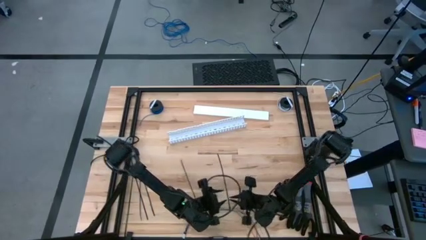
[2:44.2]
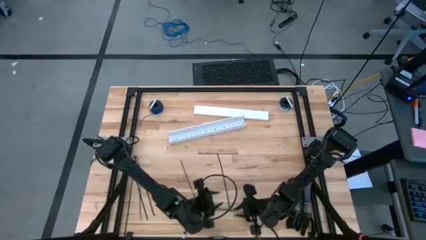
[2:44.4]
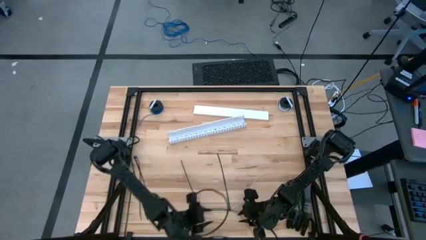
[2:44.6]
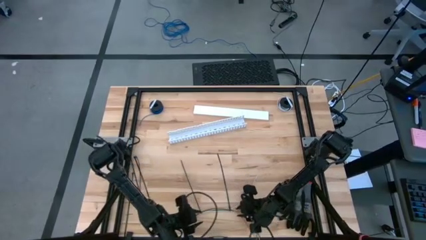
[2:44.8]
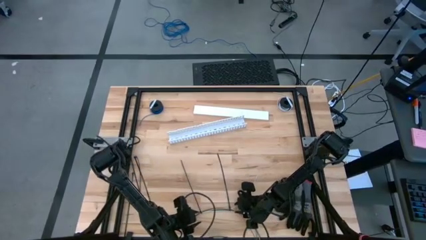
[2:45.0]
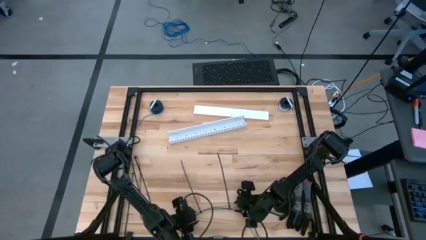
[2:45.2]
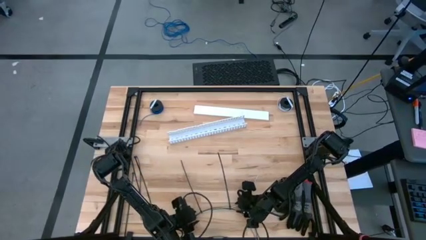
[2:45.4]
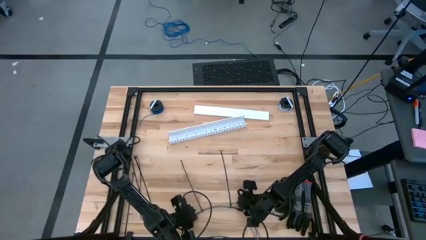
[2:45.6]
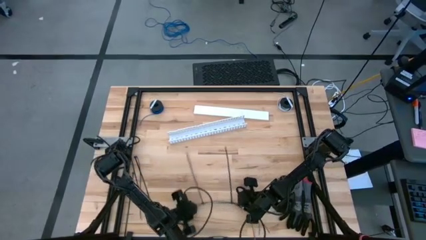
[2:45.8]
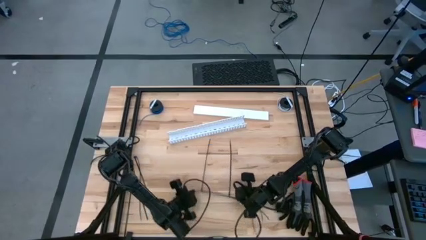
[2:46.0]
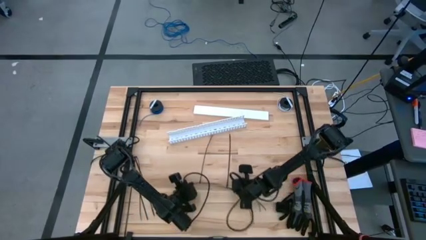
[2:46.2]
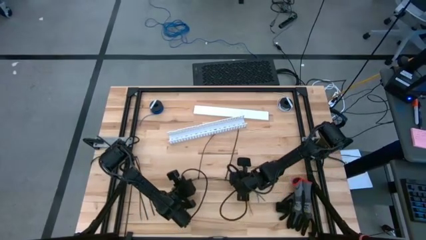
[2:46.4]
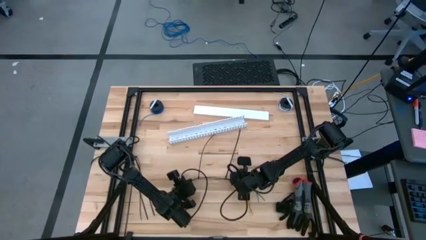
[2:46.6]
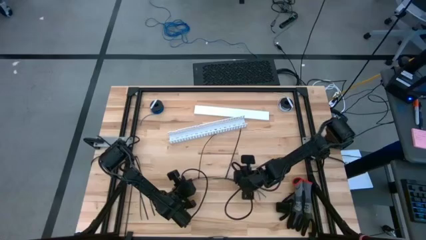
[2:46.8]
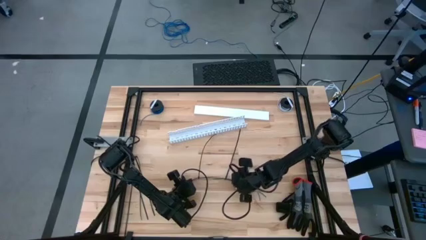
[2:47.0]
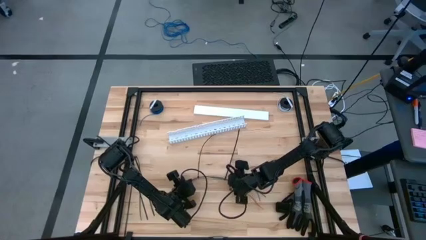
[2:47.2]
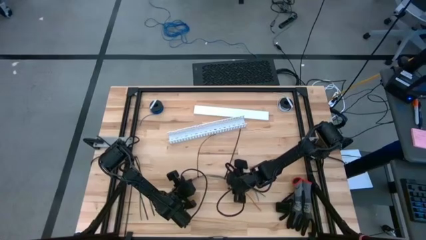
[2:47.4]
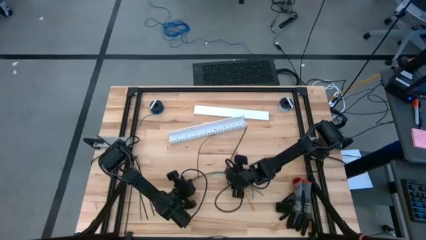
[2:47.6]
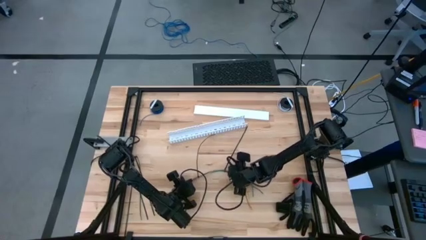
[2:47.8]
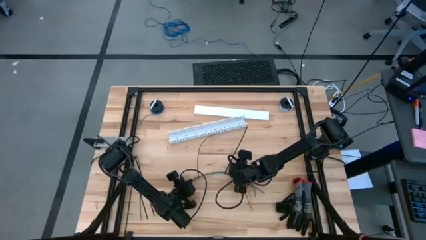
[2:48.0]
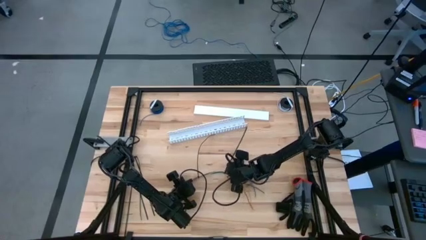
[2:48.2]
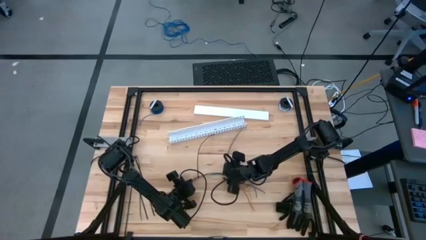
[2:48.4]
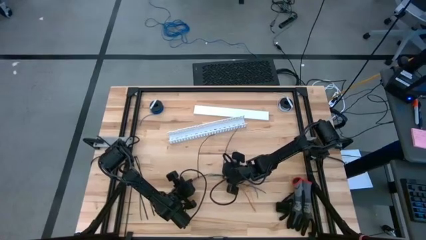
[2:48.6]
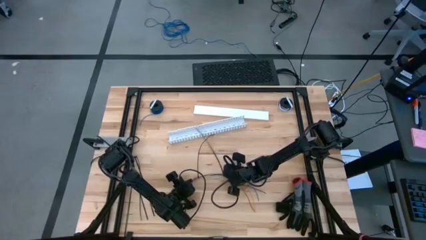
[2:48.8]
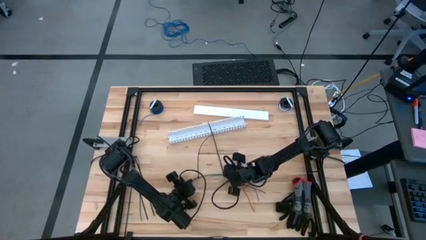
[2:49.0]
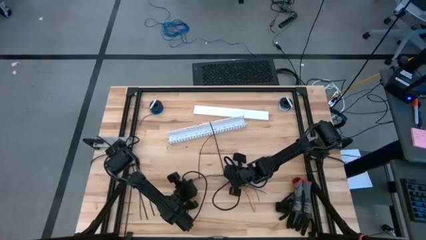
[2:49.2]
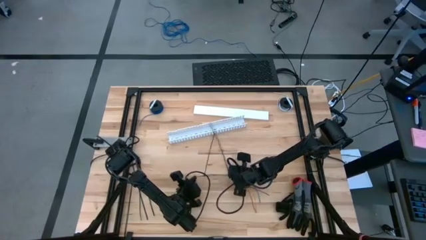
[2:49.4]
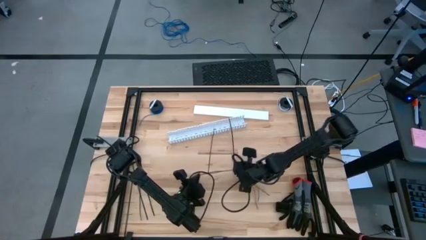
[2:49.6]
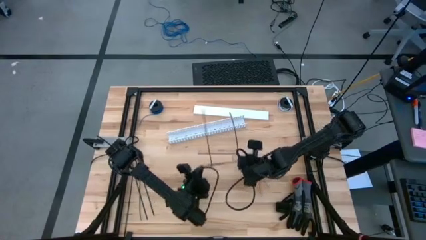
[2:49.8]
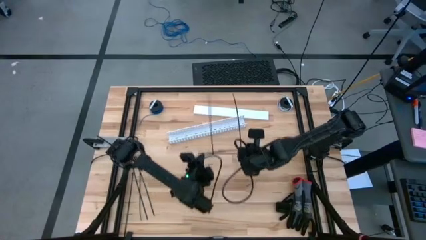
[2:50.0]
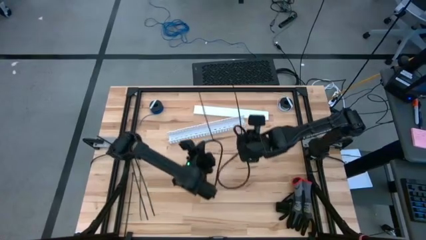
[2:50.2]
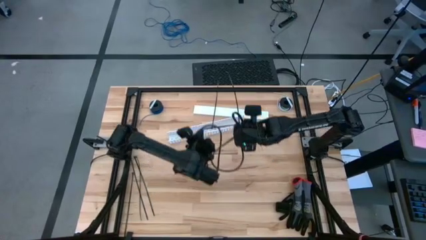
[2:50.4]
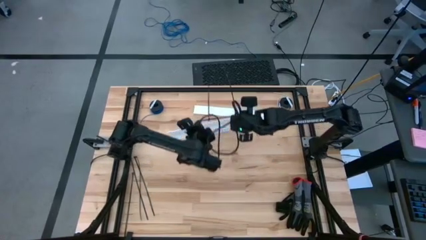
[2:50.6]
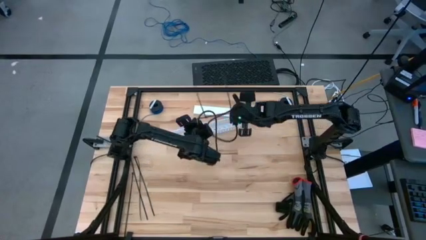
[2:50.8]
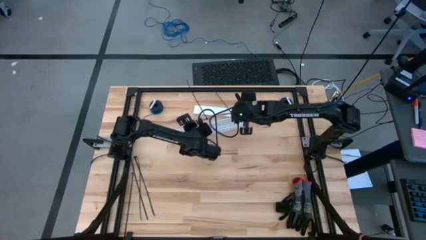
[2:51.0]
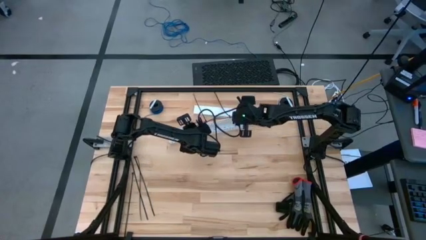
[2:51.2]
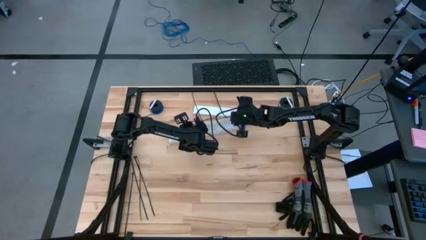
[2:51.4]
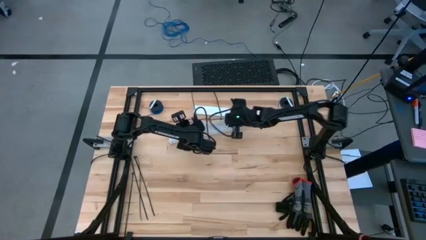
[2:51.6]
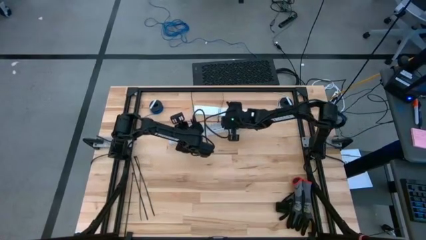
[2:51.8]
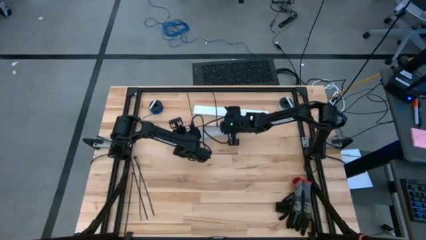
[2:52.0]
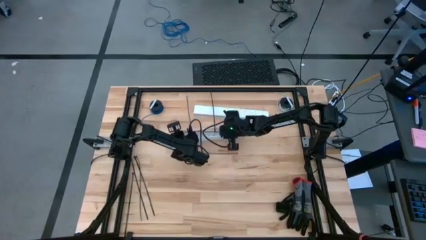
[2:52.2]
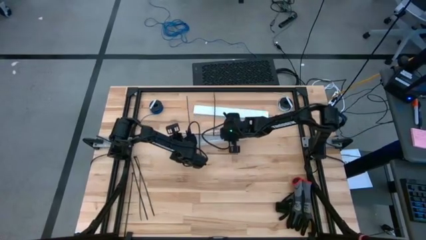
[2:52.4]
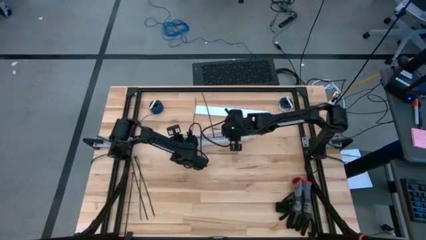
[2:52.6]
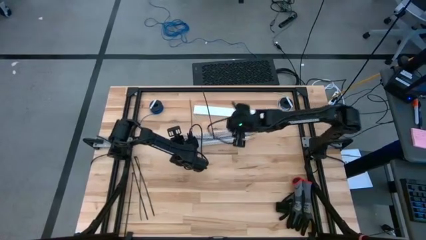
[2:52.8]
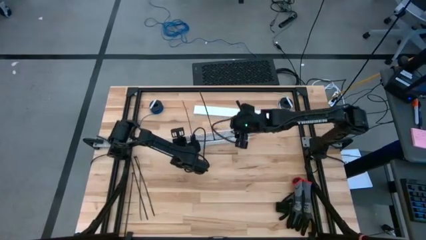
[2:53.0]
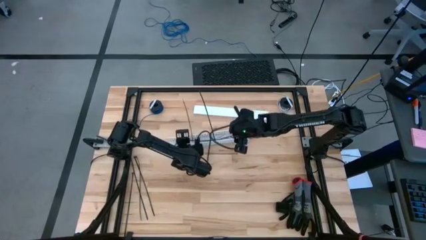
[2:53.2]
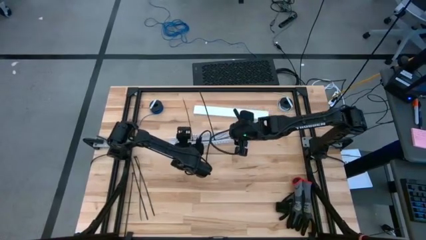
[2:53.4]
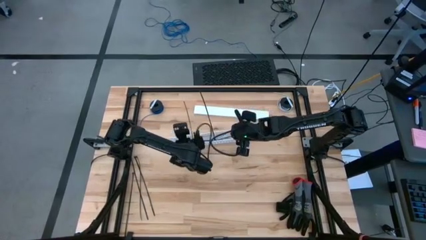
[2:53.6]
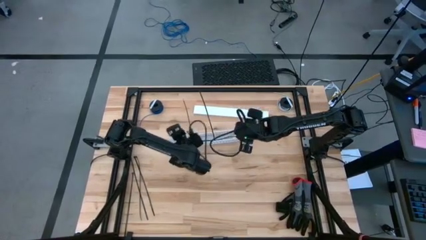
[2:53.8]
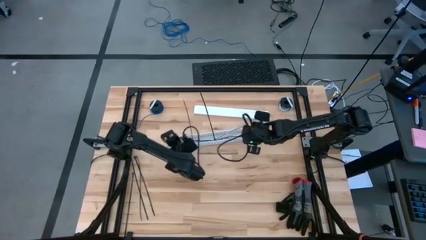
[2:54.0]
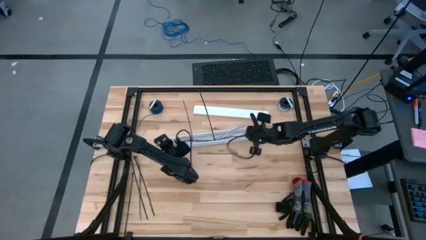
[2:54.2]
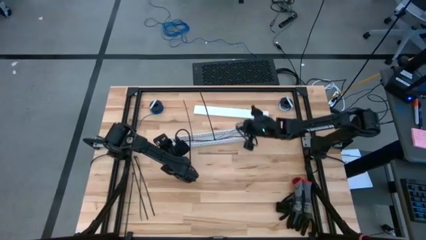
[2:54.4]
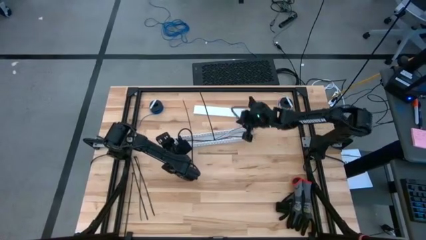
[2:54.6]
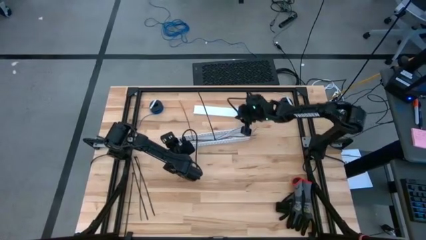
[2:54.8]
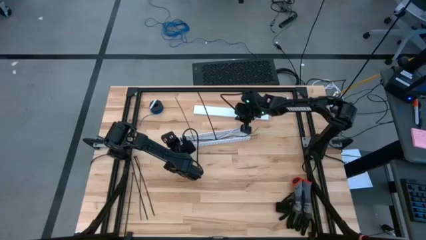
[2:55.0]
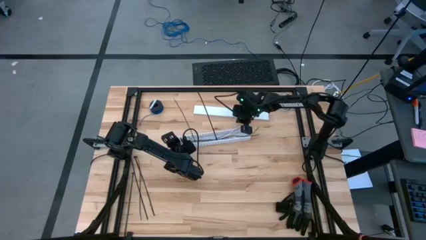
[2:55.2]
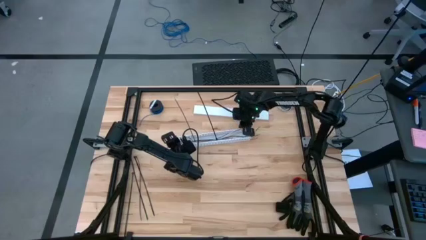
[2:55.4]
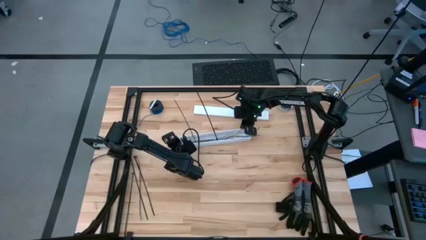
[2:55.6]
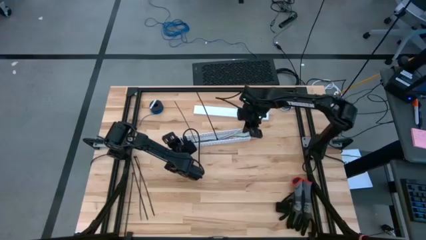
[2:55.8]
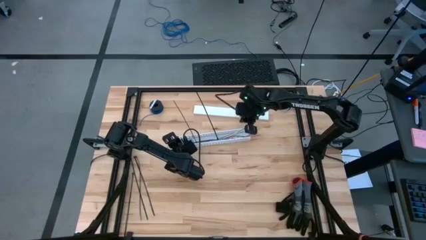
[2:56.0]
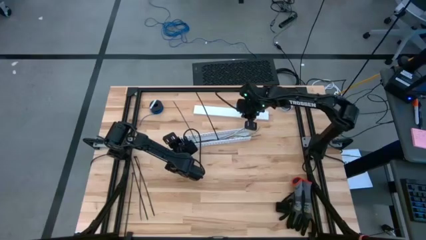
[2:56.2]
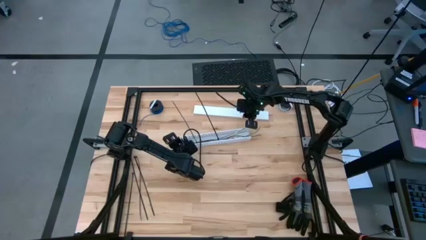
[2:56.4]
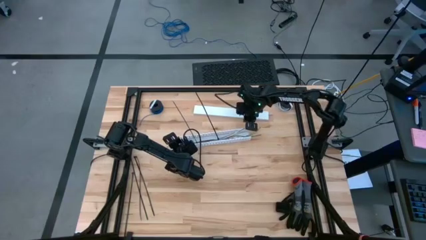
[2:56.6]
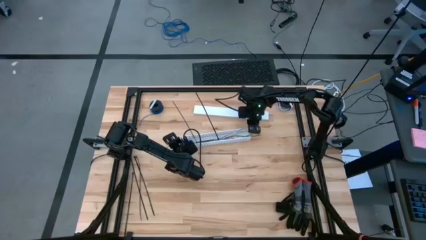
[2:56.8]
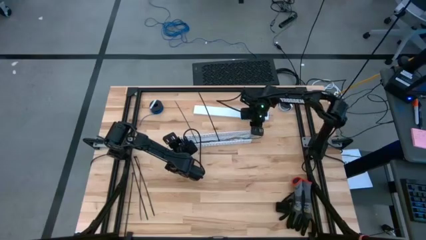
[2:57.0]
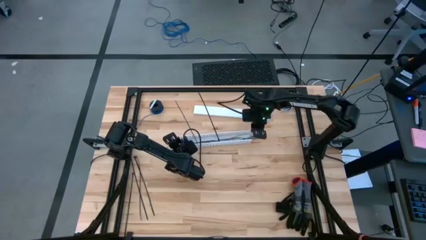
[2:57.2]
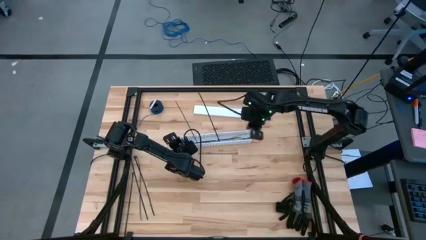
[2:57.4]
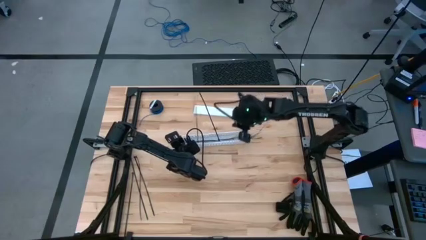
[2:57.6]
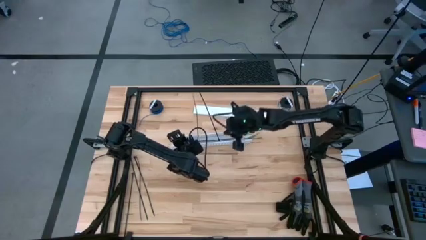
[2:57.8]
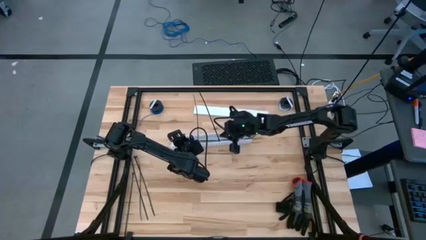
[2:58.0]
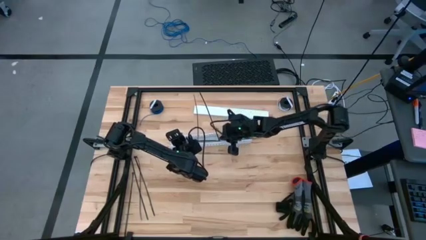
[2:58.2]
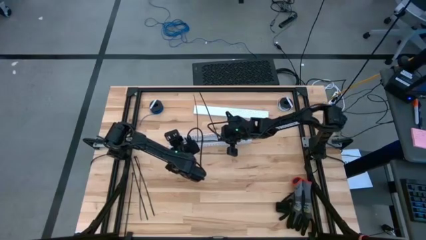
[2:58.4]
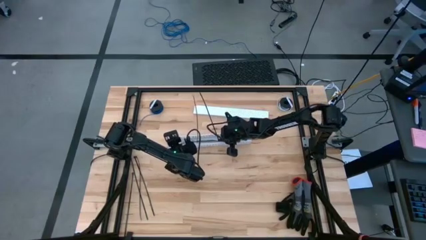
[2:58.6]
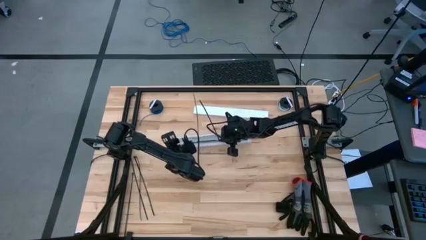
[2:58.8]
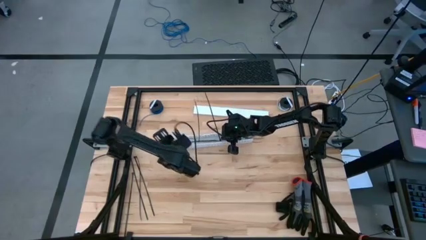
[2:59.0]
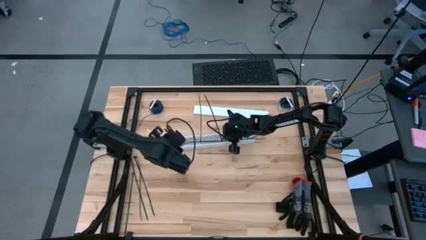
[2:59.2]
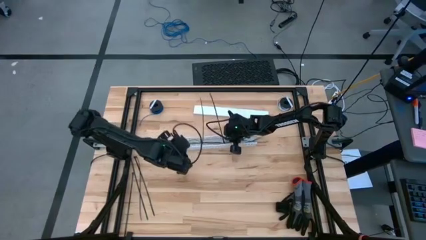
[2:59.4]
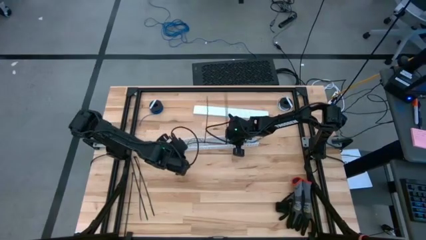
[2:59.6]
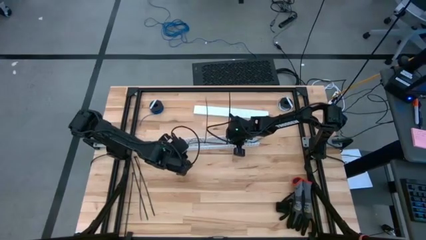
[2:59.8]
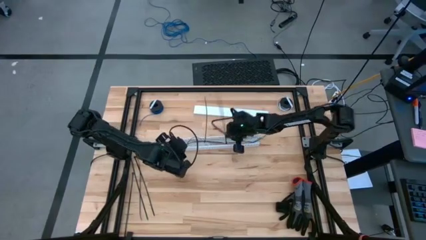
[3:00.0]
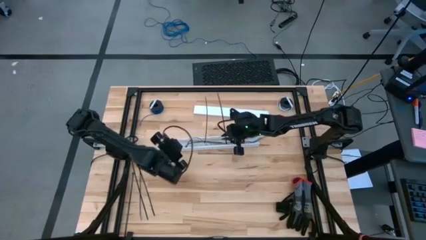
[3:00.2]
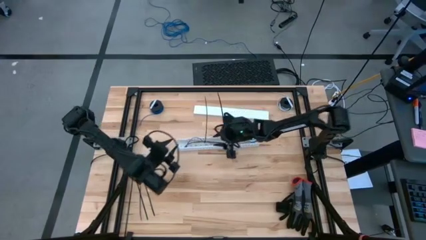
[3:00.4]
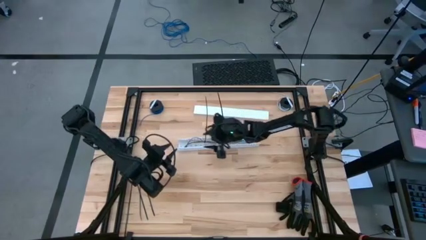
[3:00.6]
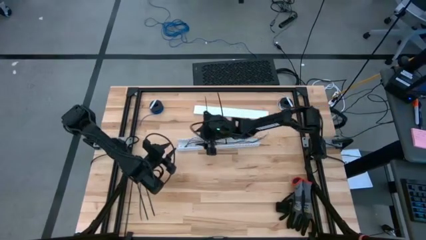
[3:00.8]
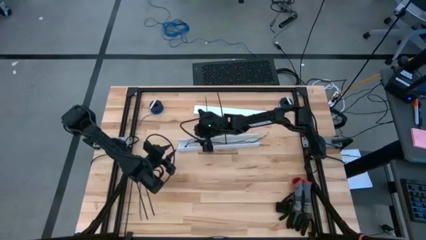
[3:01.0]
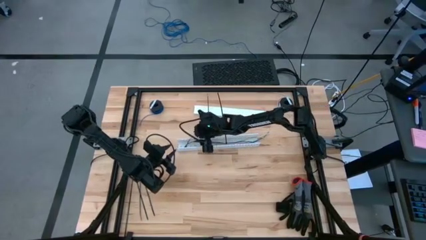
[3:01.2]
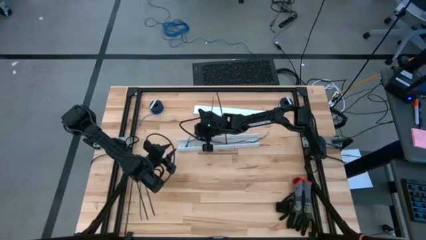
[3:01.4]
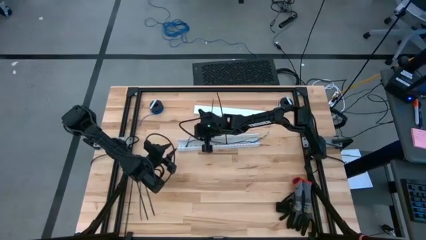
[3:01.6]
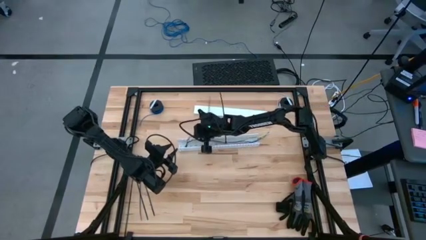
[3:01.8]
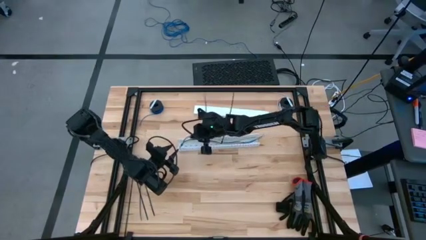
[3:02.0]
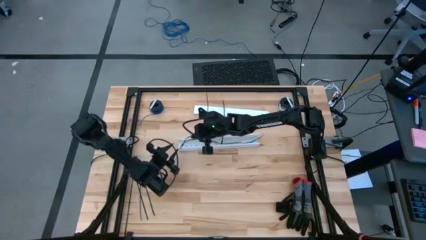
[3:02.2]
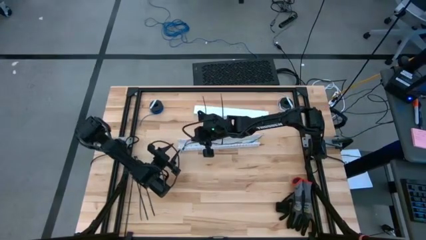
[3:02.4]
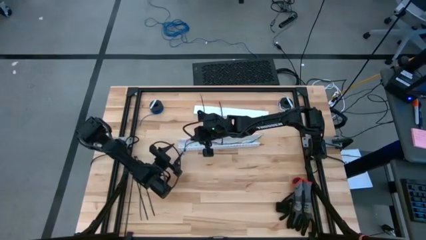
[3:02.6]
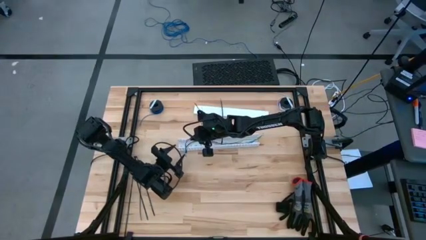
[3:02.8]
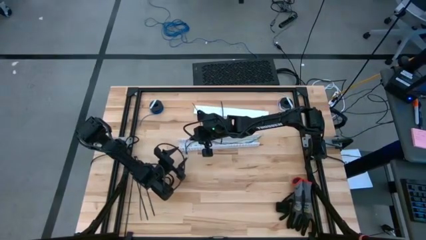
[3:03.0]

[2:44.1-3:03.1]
Task: Ziptie cables
Put the colored ziptied cables into the white cable duct
